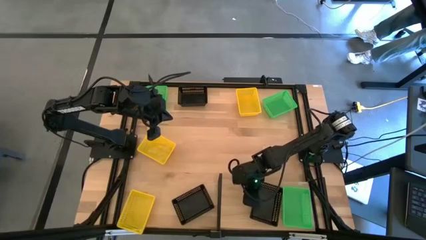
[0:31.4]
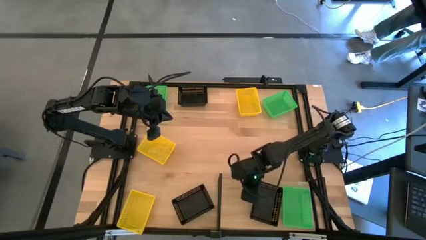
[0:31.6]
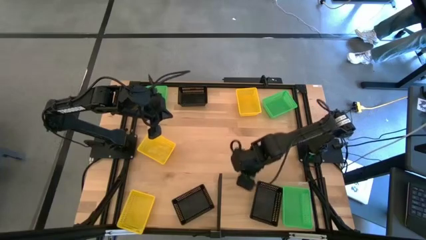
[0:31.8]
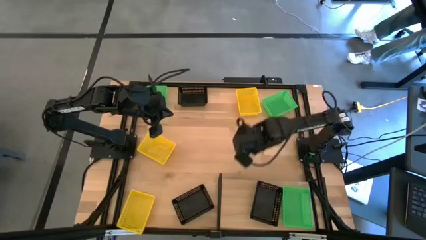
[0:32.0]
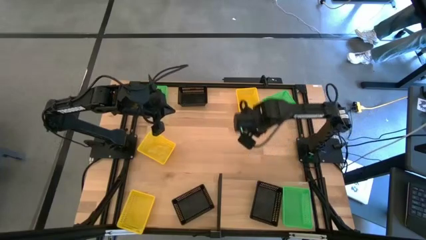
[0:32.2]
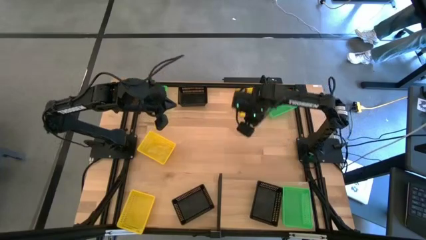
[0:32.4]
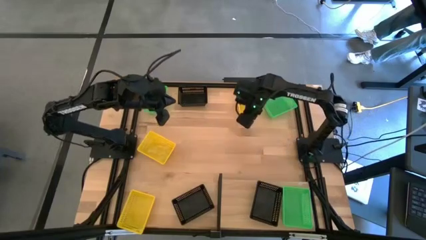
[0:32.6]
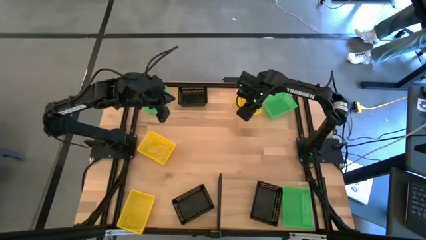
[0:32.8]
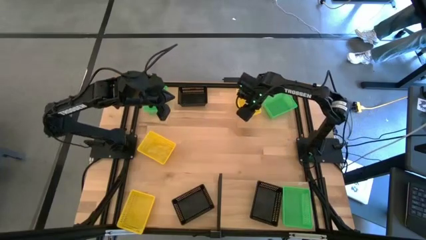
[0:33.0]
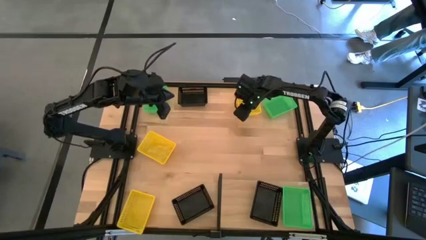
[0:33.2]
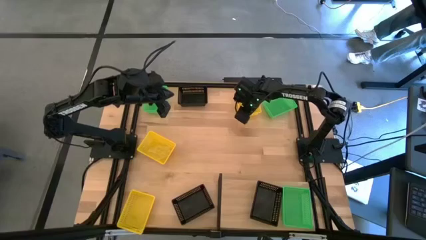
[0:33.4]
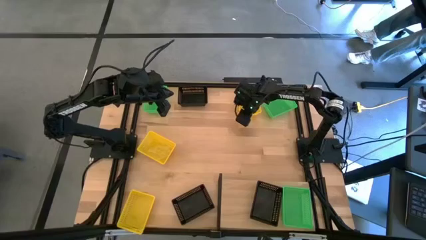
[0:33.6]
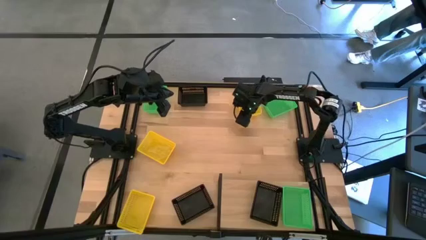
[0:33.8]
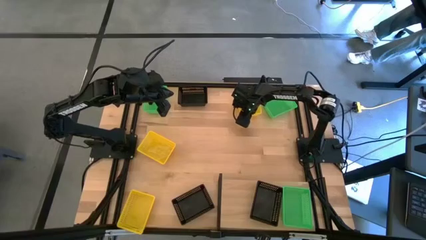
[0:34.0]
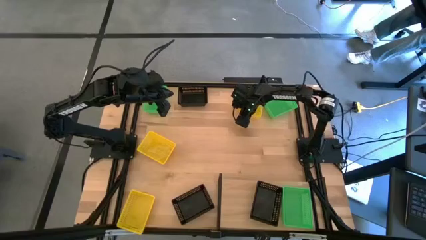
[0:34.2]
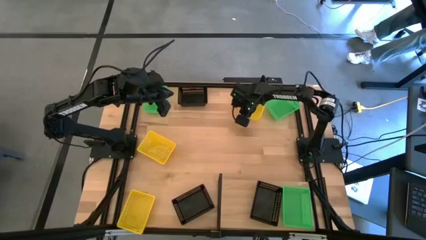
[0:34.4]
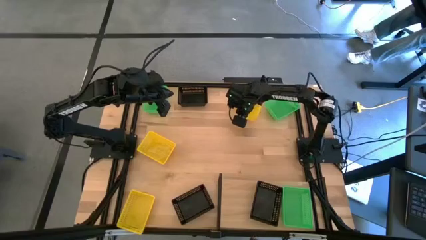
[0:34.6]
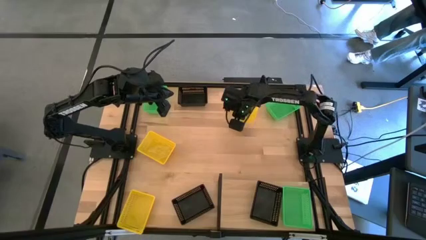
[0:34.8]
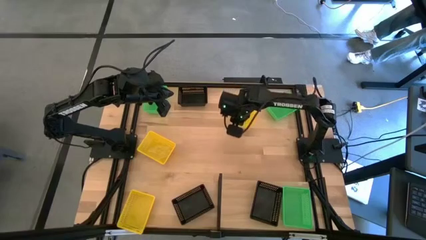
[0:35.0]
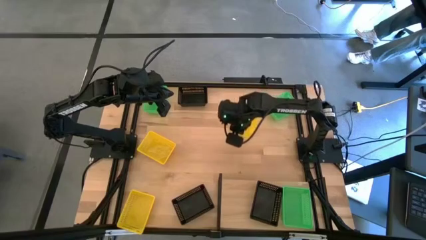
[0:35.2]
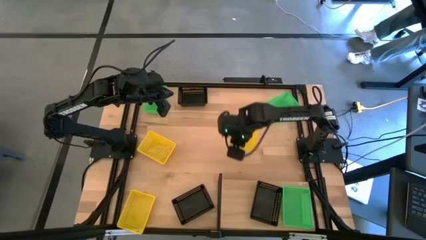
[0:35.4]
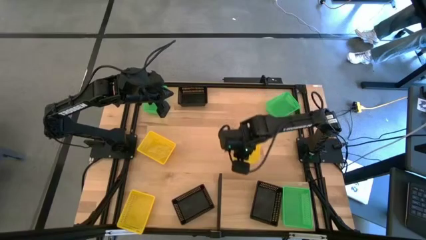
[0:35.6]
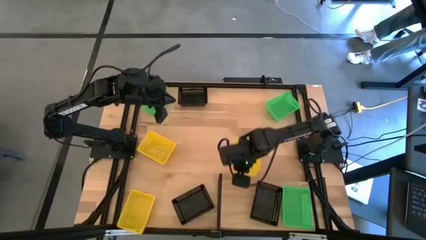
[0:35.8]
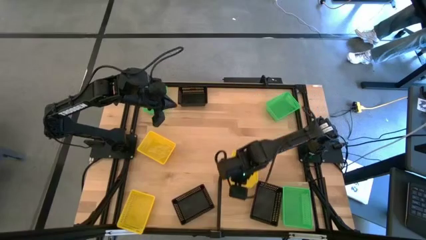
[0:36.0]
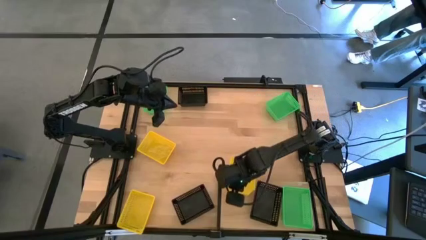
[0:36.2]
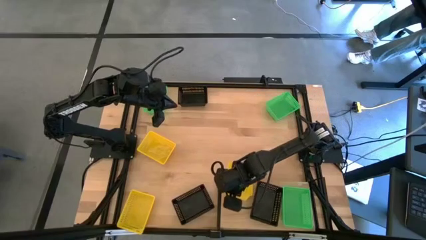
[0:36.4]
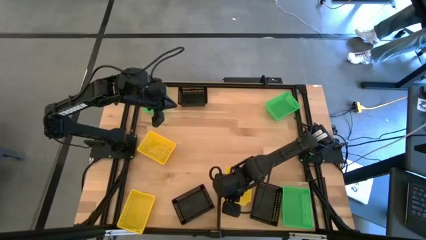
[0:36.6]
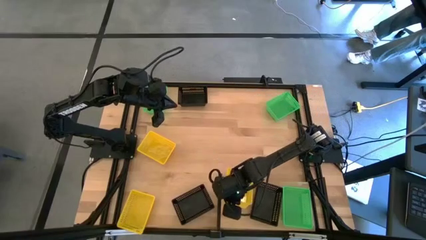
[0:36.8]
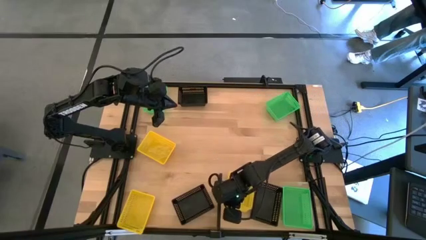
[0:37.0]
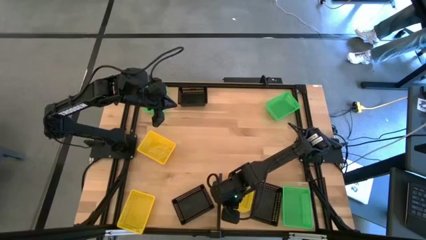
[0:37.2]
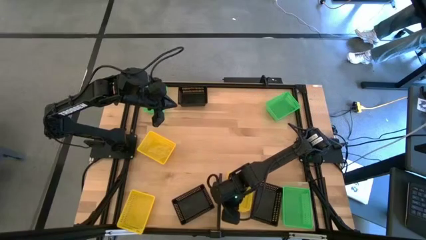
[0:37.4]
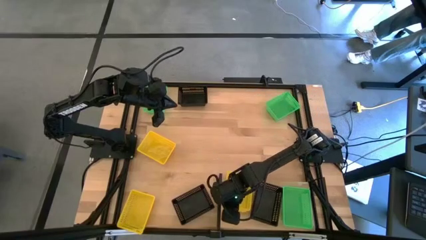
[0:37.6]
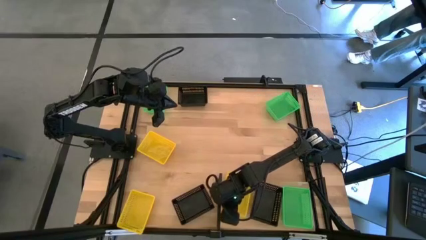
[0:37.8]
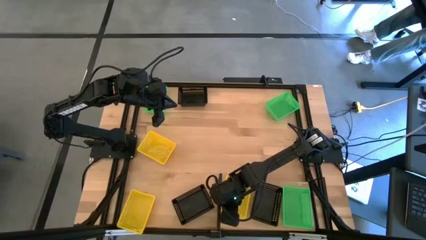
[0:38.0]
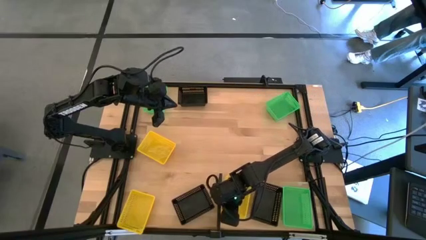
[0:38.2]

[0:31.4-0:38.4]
Task: Stack baskets on shelf by color
Put the top right yellow bin on the shelf

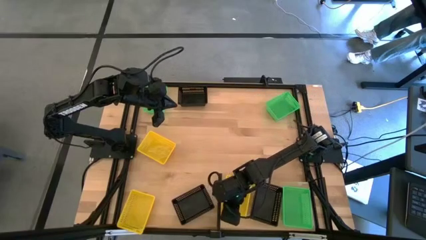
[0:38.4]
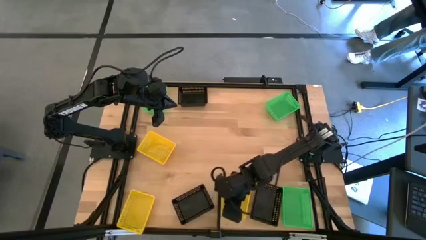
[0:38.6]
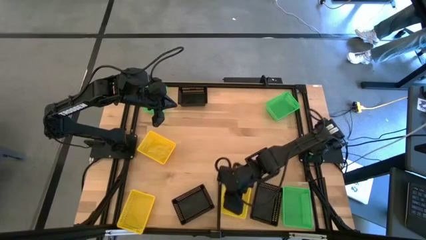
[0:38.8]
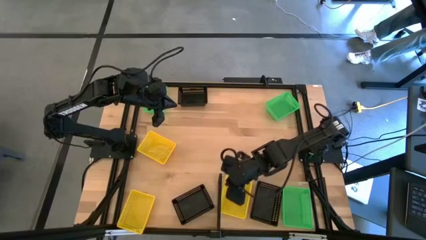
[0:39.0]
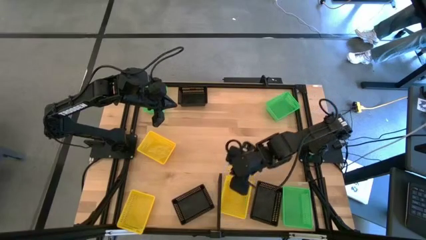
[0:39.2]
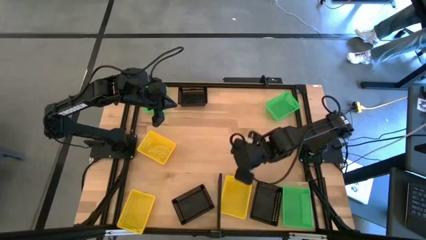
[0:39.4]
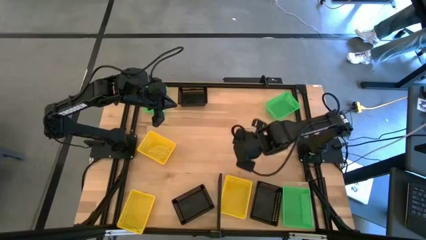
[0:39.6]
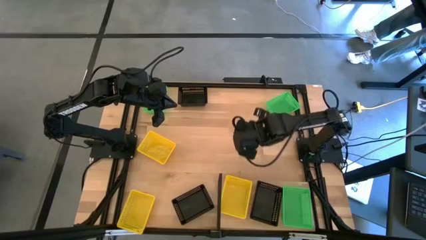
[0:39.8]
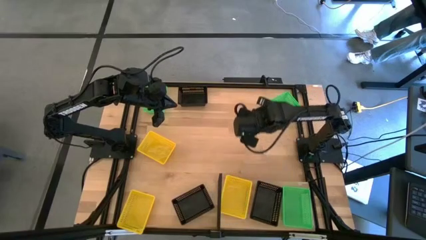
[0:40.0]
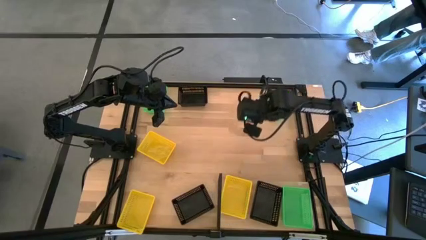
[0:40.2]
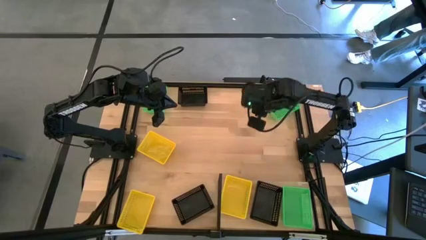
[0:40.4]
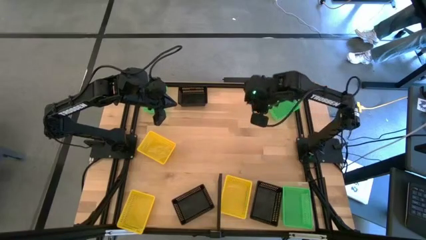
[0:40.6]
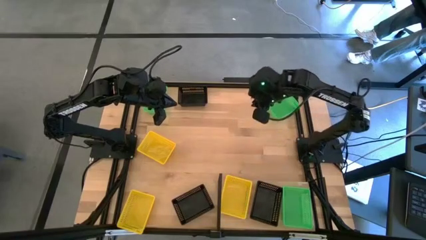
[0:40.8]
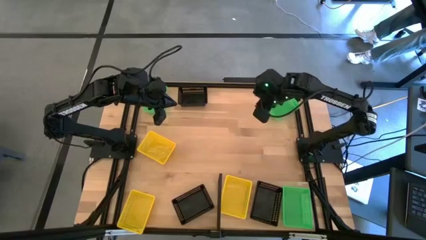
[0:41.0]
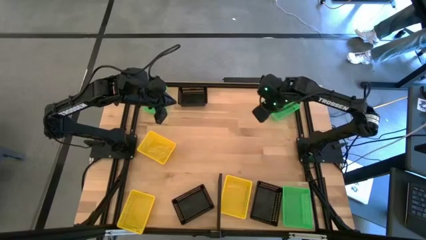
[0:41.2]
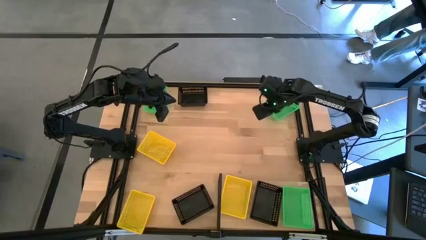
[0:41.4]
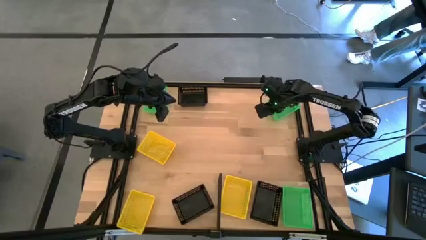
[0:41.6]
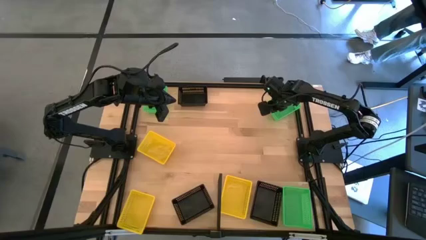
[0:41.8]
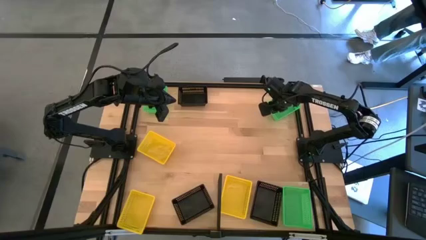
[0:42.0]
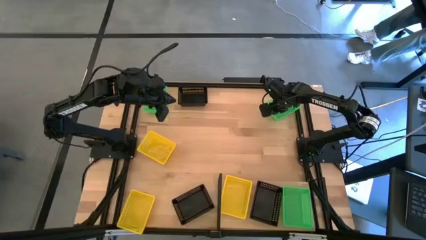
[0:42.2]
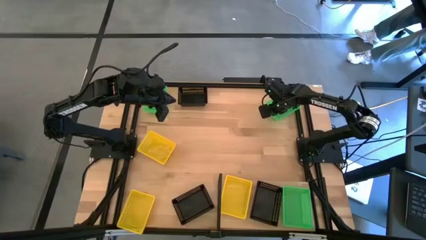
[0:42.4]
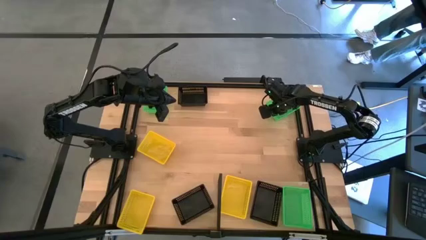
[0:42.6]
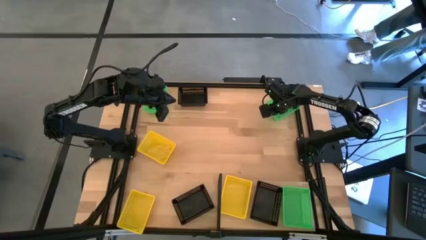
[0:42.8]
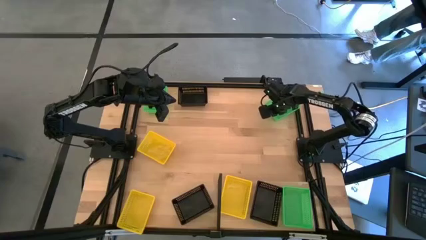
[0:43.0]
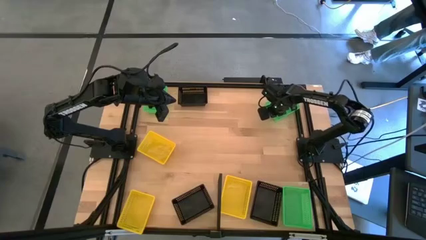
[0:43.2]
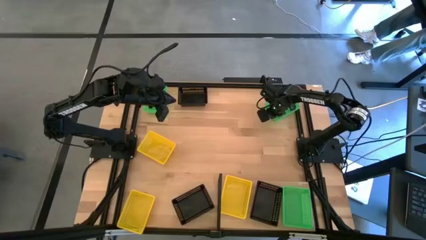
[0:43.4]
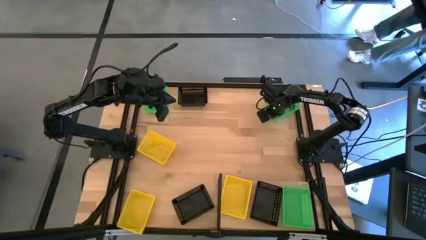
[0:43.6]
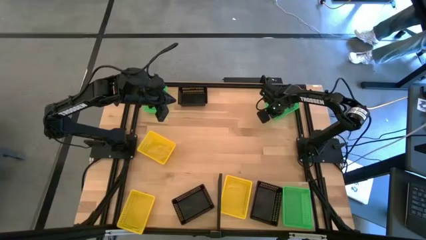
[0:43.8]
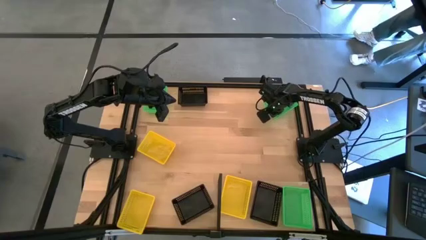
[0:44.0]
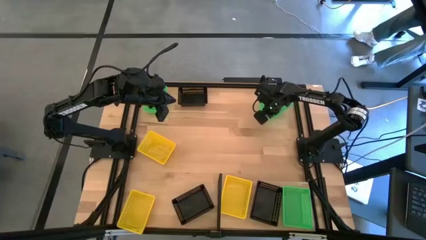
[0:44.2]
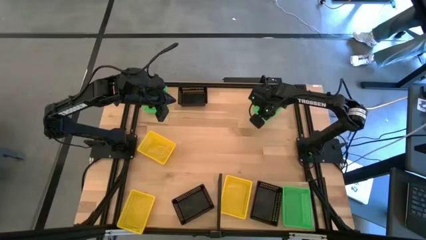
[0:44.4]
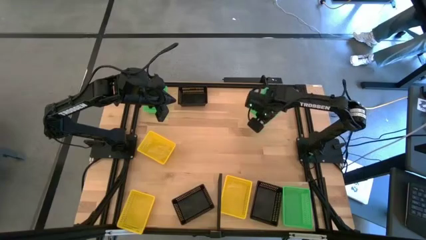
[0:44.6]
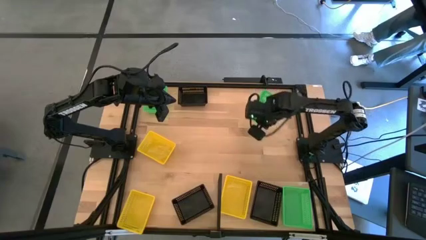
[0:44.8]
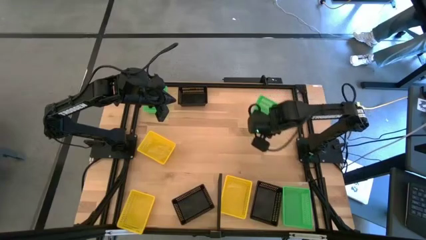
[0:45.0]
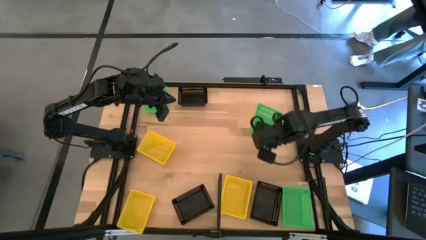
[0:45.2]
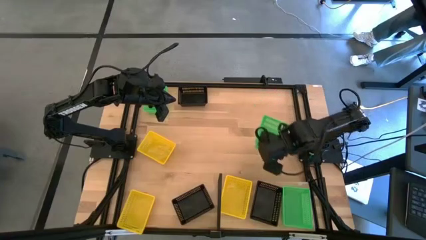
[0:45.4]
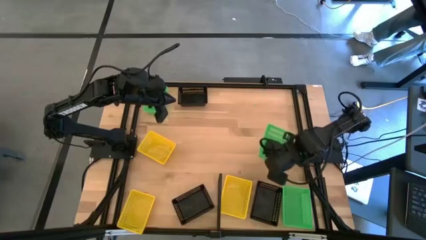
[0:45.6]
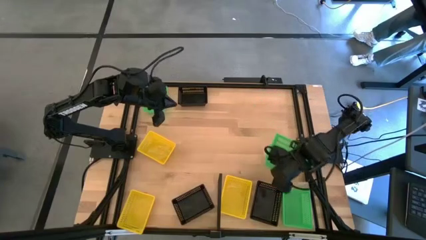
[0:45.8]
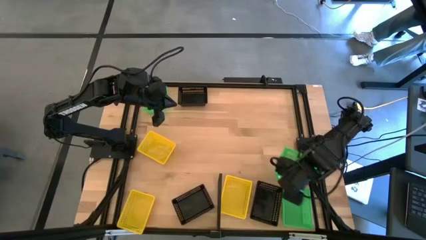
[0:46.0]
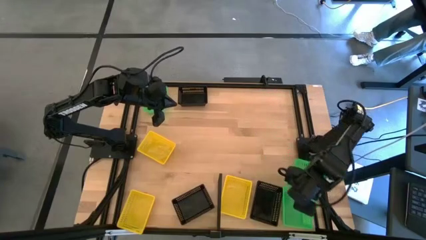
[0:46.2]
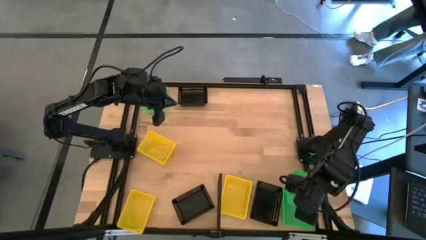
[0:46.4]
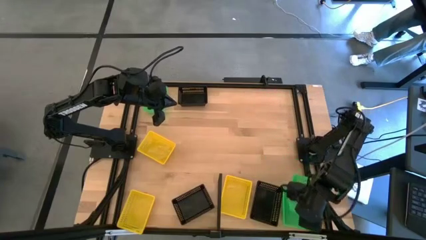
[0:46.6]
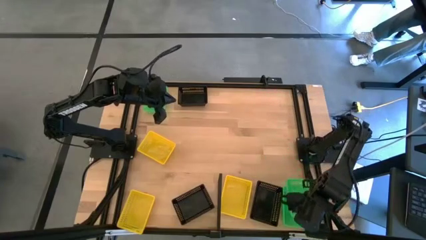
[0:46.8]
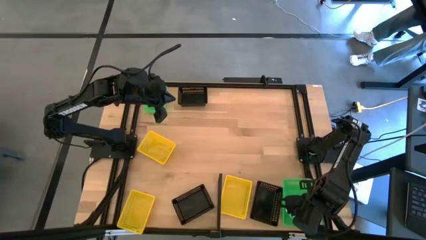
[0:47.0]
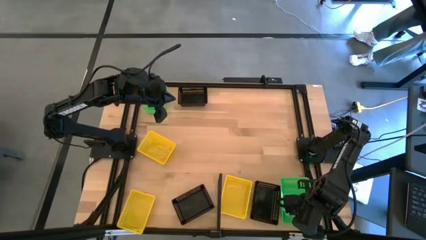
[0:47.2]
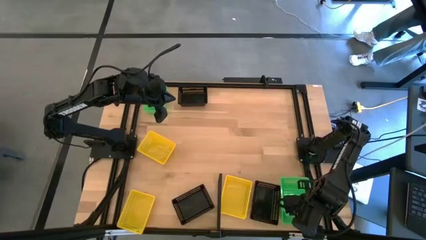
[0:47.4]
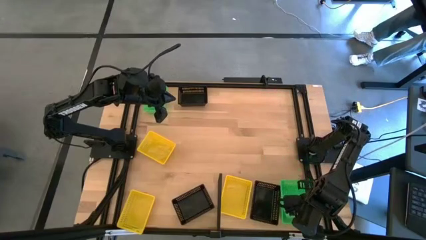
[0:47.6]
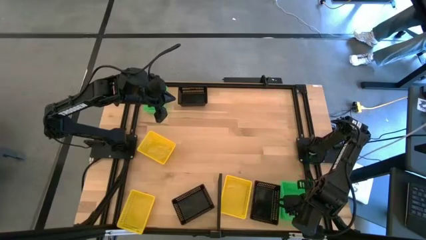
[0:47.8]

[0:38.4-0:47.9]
Stack the right green bin on top of the green bin on the shelf

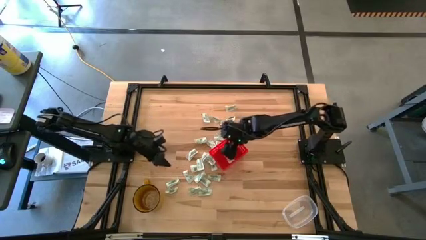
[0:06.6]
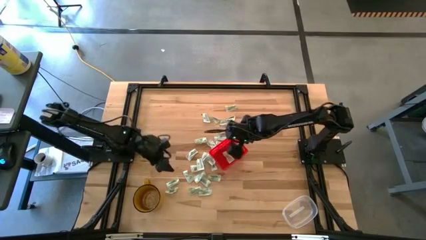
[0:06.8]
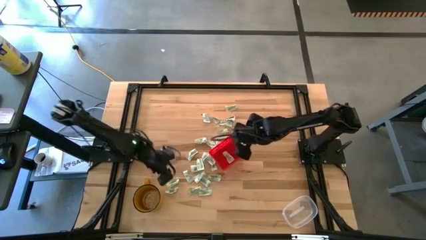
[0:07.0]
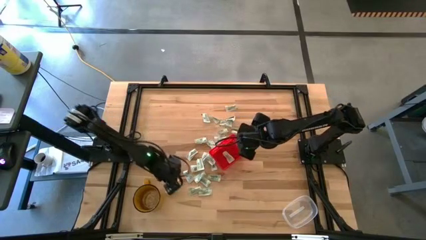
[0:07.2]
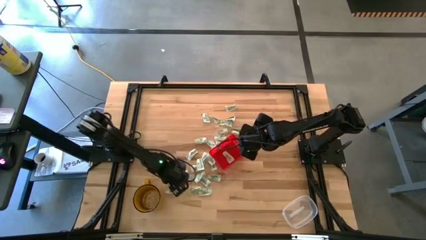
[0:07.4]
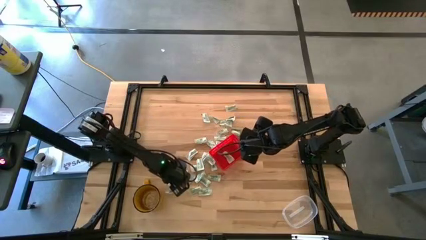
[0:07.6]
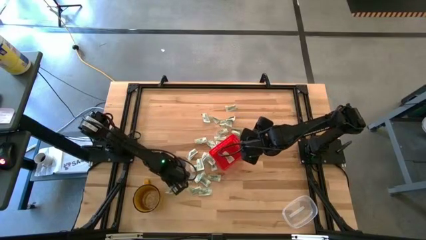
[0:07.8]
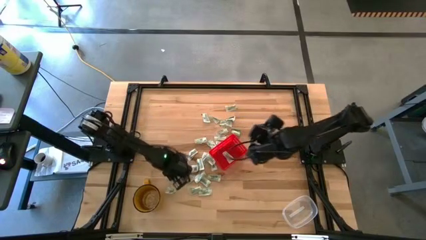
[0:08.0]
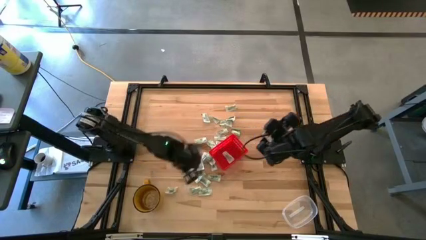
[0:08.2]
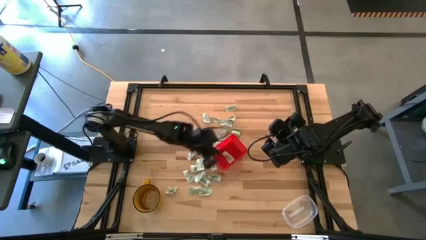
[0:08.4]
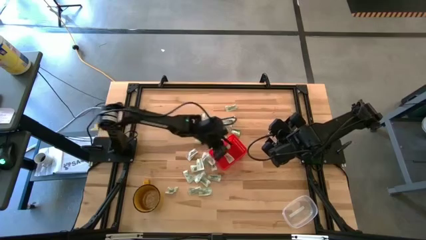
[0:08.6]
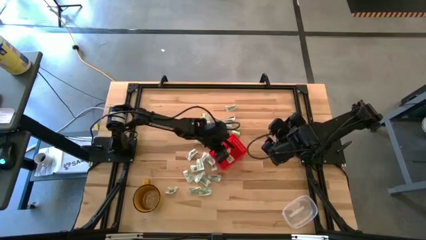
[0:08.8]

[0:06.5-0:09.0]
Task: Pick and place items into bin
Put the light green stevia packet into the red bin
